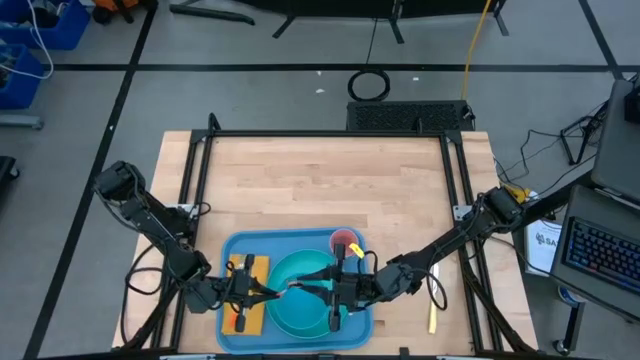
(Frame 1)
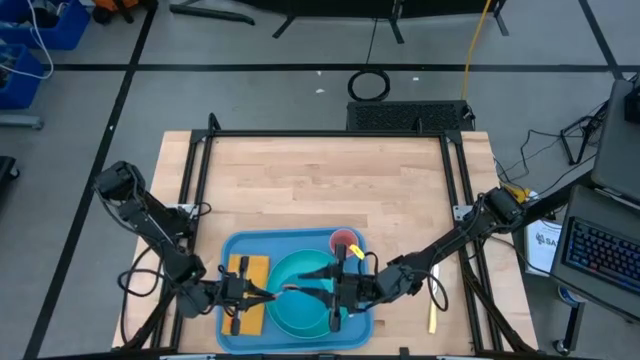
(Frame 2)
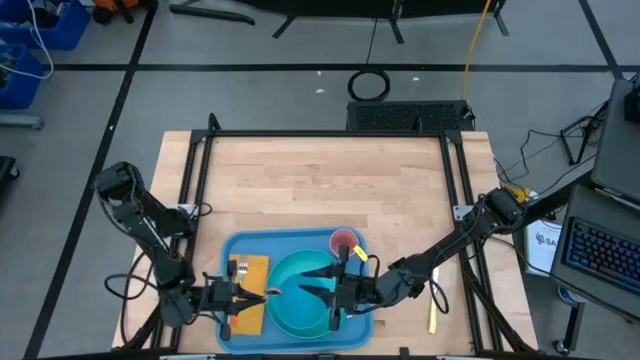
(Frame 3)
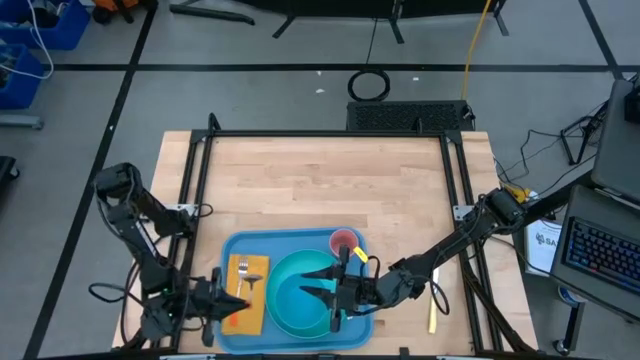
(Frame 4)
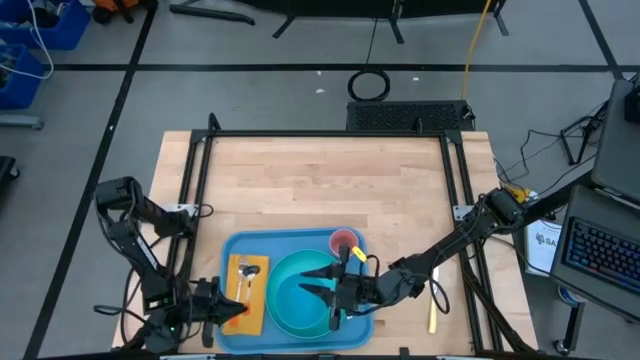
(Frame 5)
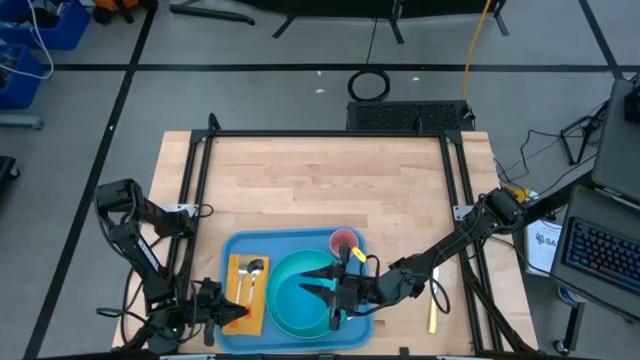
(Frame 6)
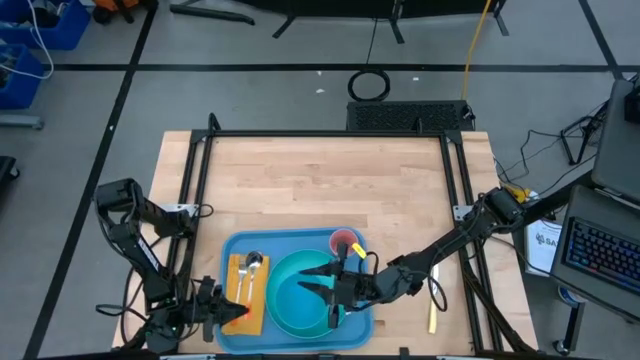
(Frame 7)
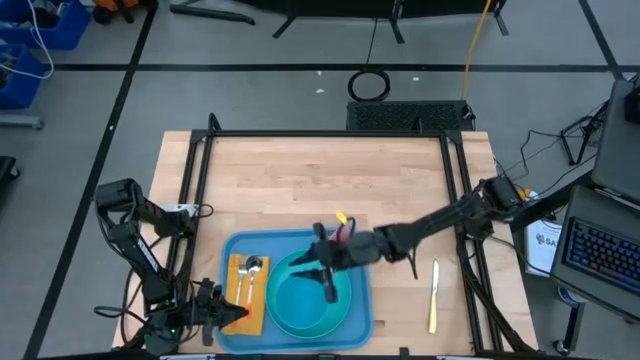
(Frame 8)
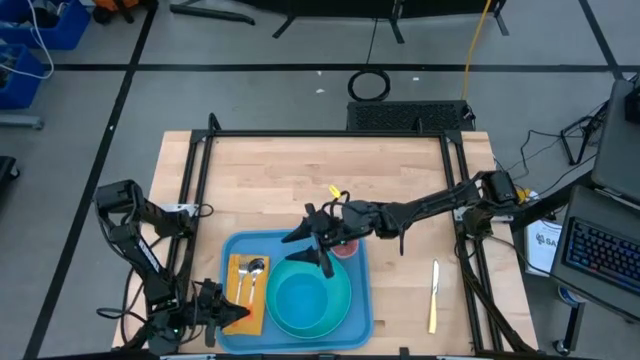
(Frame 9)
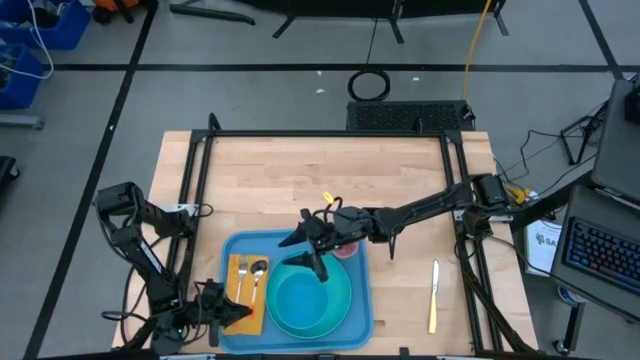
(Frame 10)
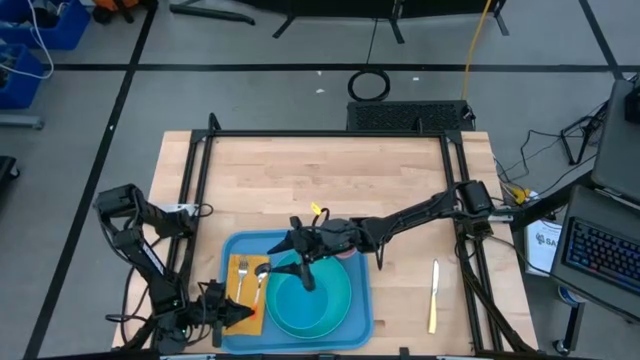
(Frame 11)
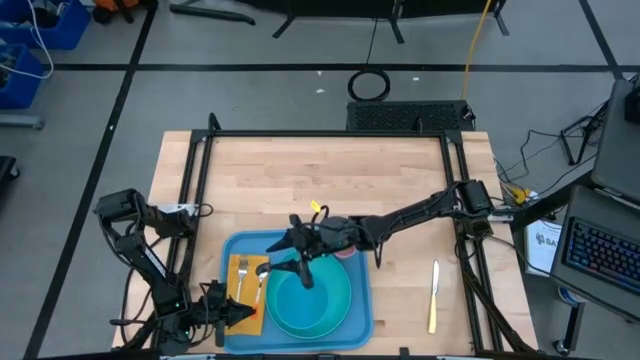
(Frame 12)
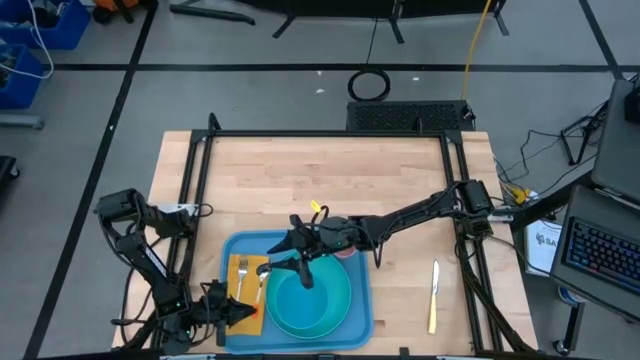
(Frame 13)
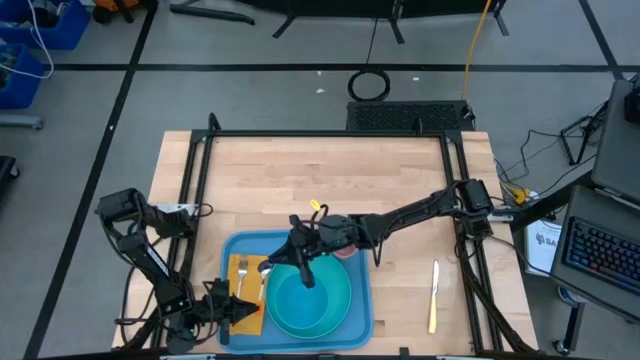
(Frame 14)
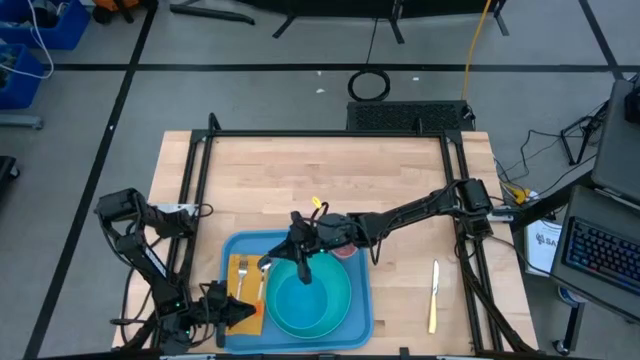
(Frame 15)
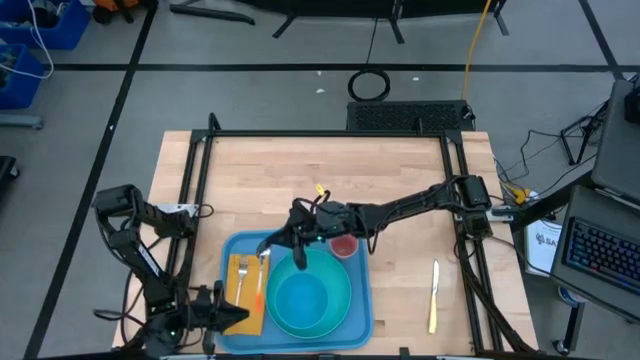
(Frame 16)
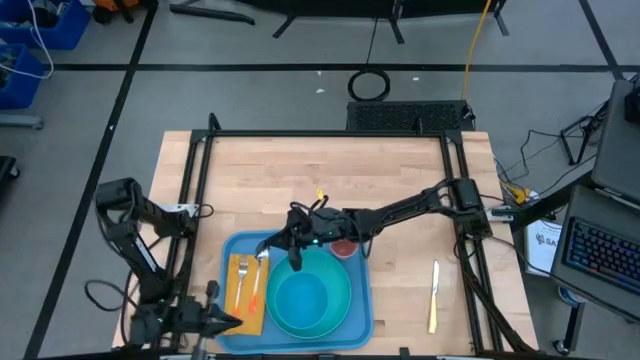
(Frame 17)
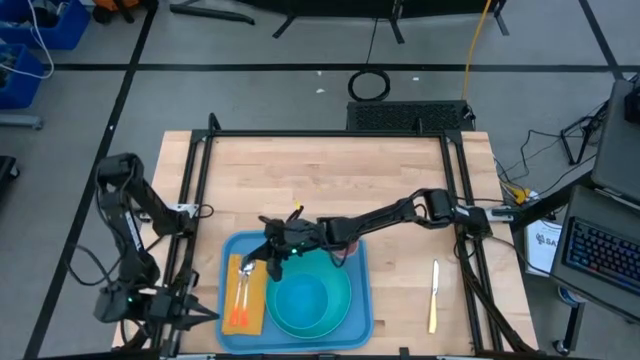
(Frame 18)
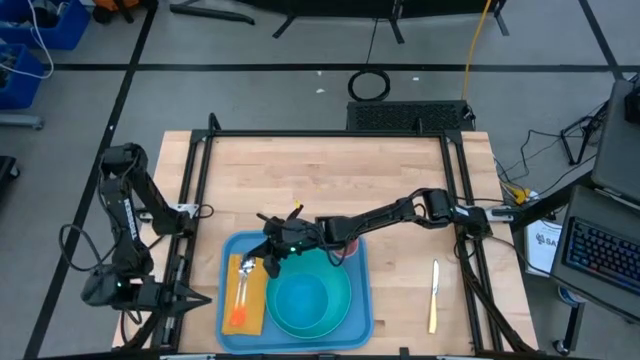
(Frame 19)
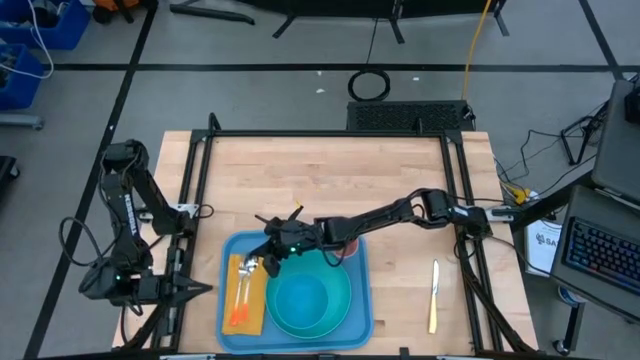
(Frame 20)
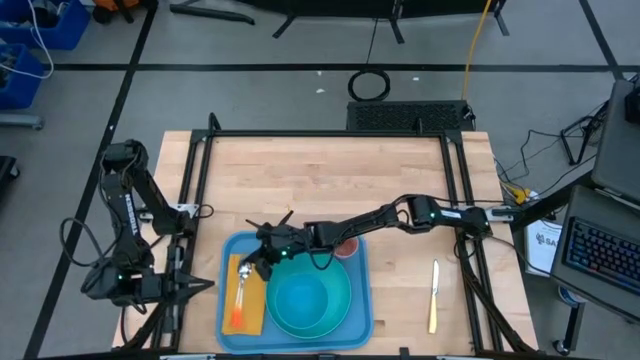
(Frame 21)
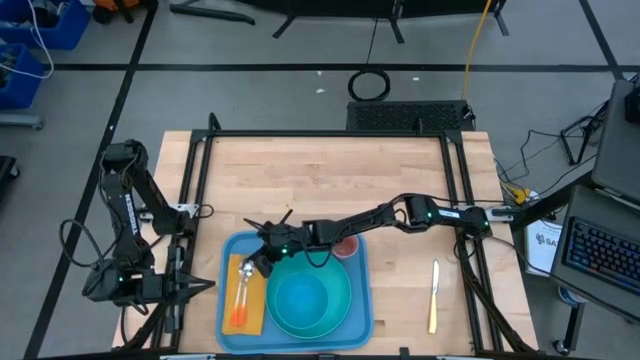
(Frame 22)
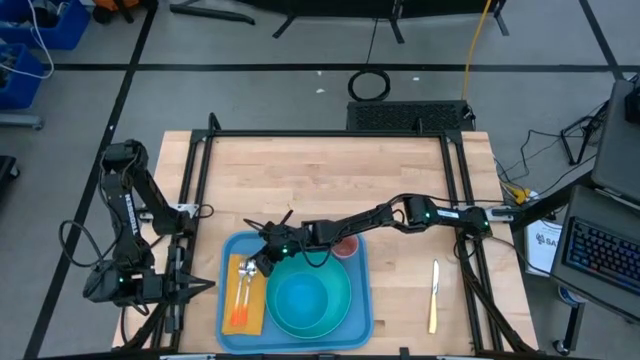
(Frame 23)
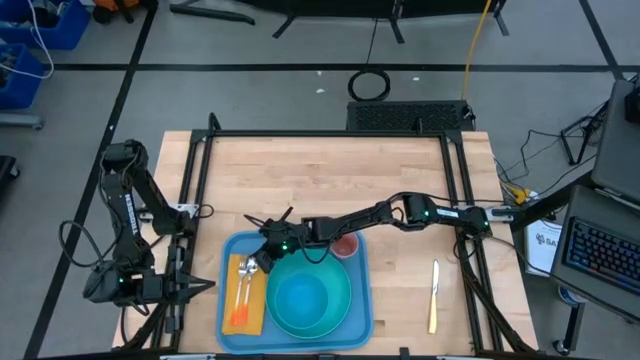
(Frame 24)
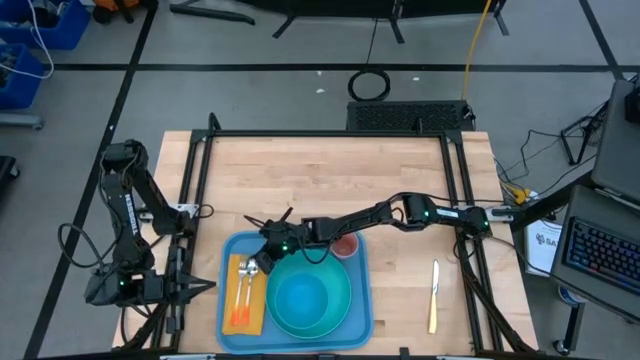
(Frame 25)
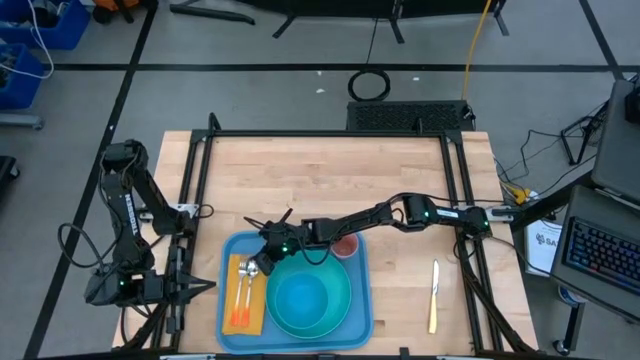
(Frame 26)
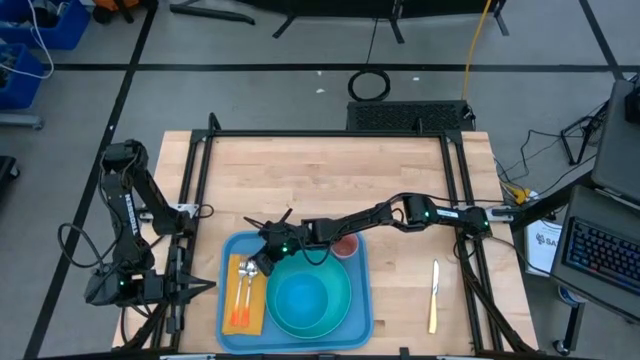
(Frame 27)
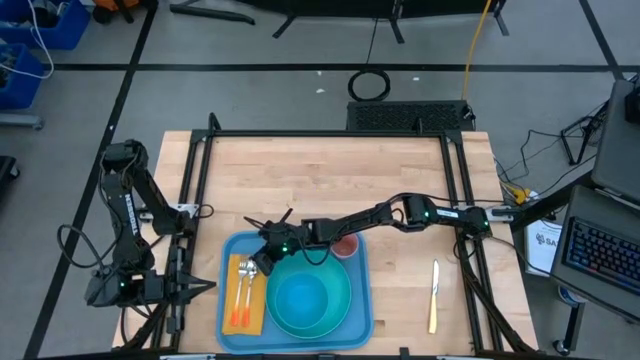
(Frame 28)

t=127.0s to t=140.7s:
Task: Set up tray
Put the orange spoon on the yellow table napkin to the right of the orange fork

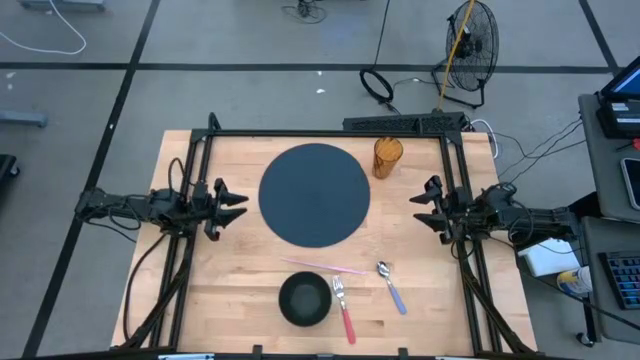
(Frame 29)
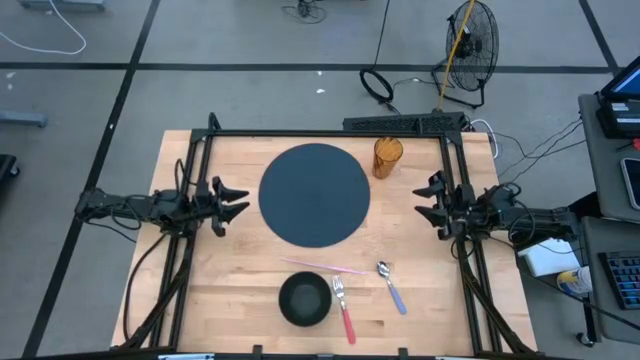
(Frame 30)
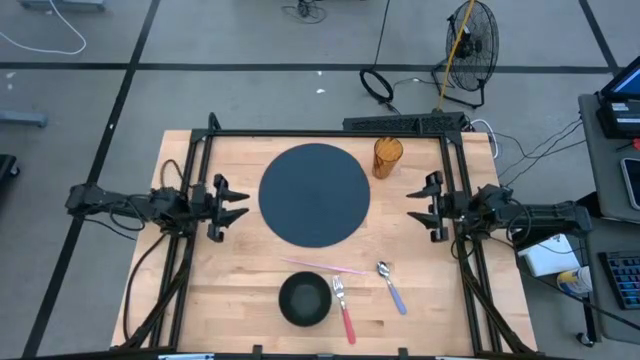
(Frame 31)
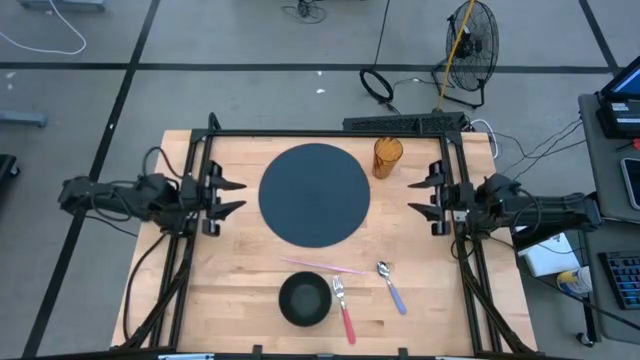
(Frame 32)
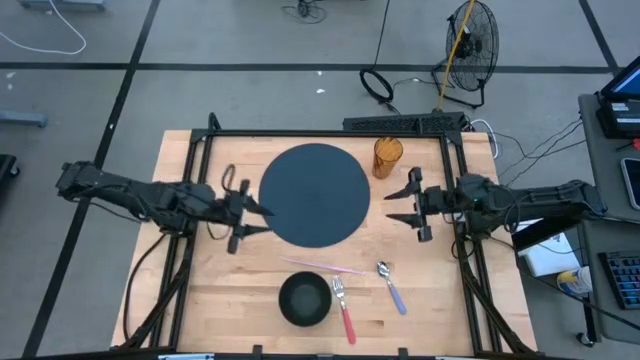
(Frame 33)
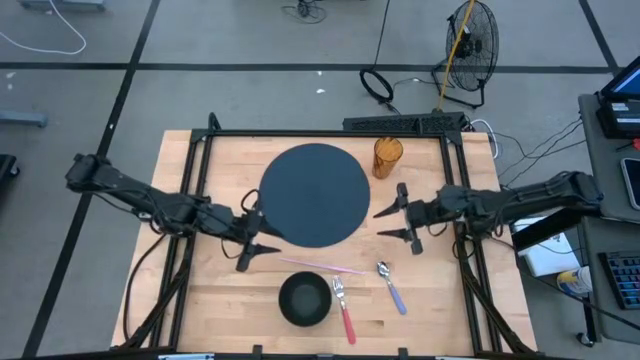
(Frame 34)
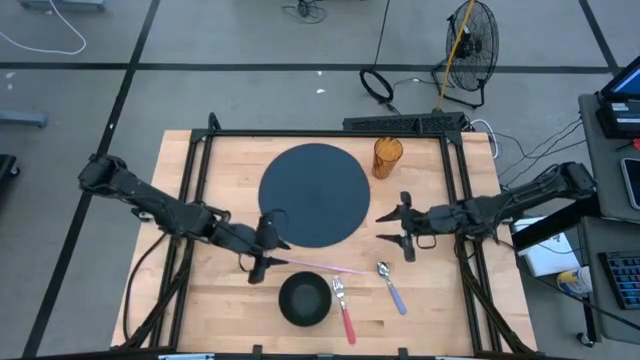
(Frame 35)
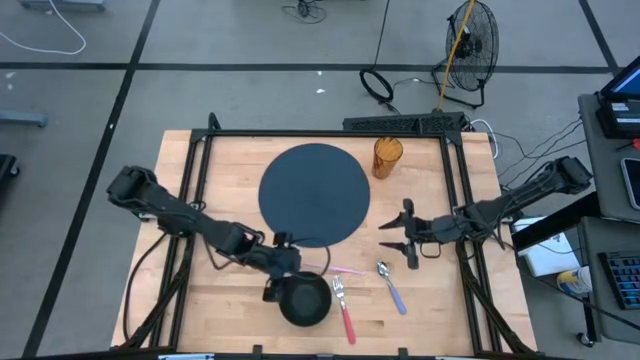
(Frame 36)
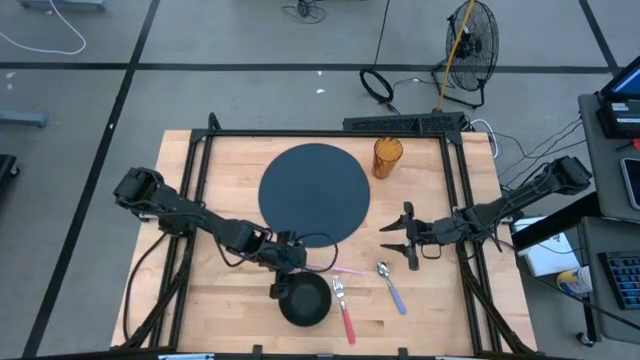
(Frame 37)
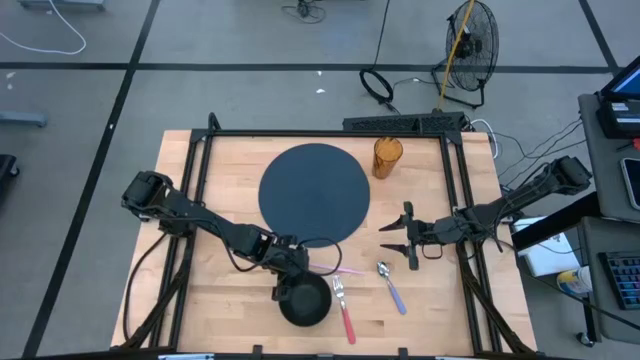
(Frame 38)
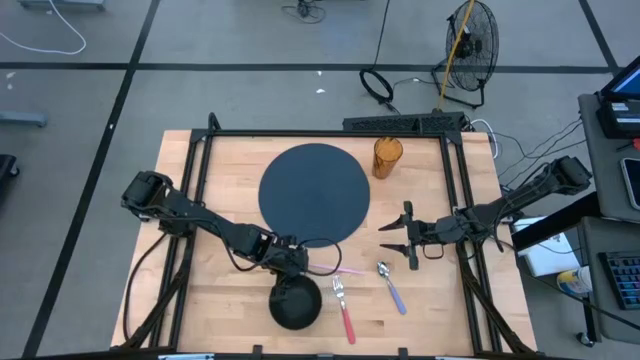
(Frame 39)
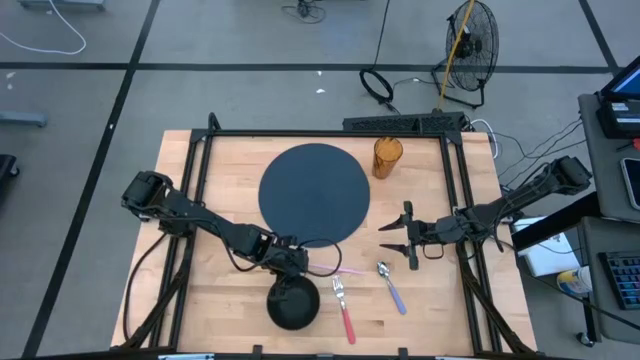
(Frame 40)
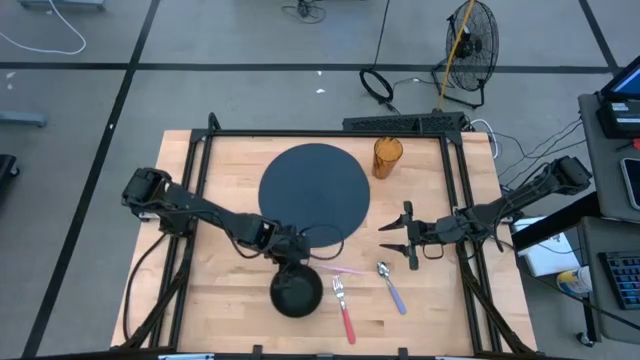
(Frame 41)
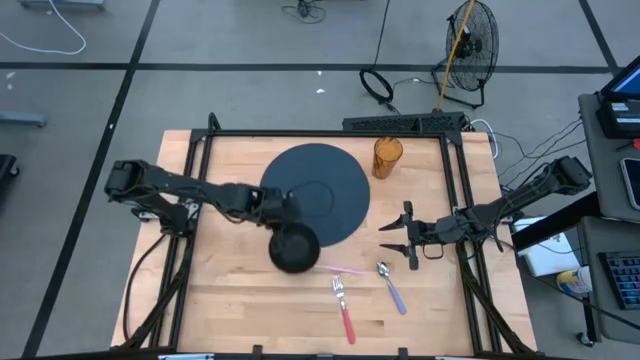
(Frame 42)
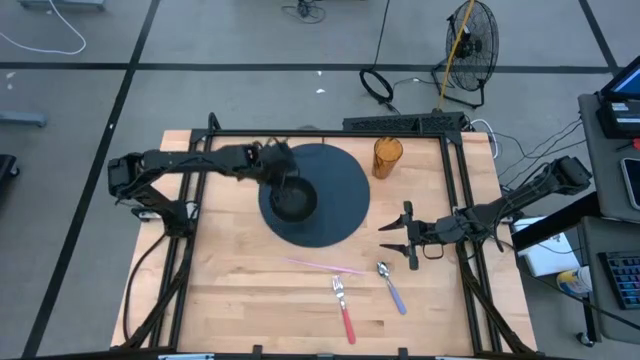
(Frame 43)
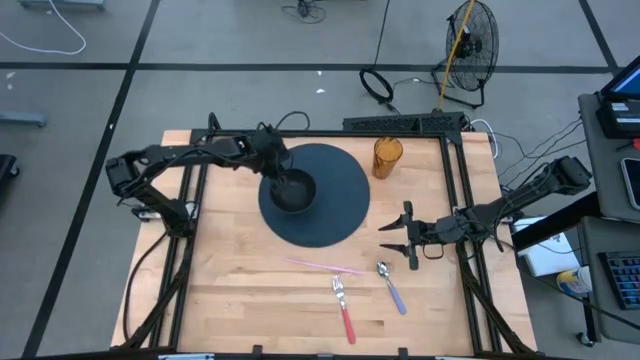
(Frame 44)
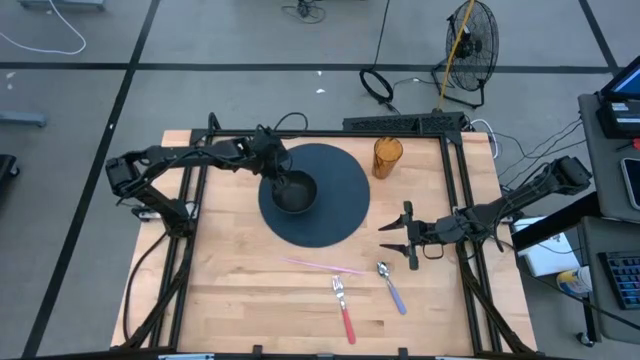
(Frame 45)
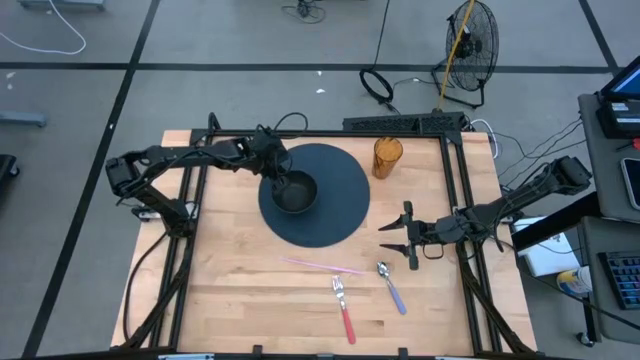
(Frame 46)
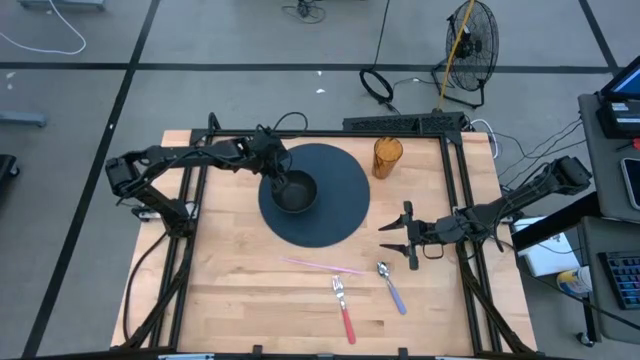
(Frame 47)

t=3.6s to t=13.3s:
Task: Pick & Place Utensil
Put the black bowl on the placemat
